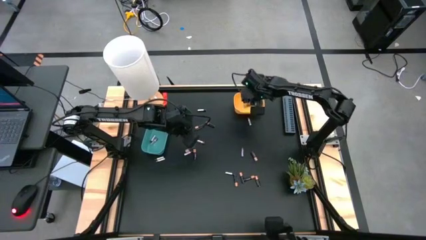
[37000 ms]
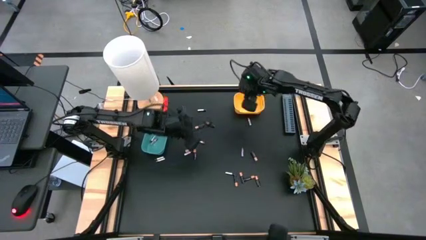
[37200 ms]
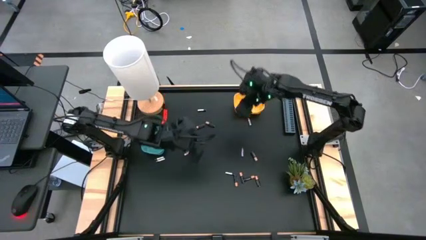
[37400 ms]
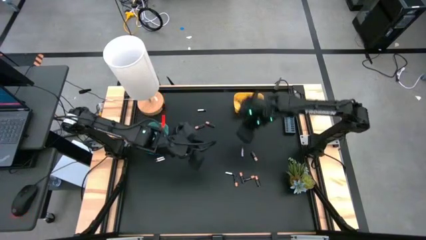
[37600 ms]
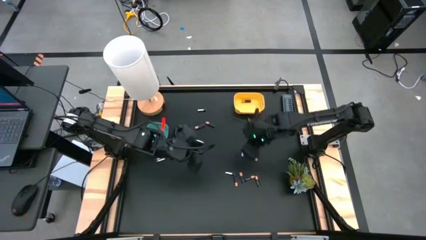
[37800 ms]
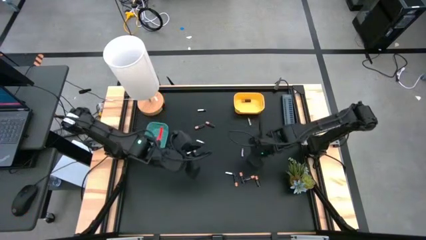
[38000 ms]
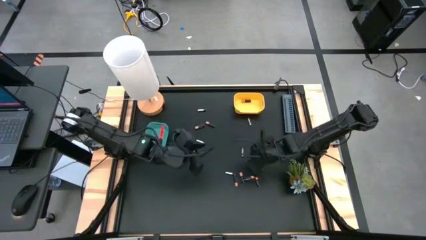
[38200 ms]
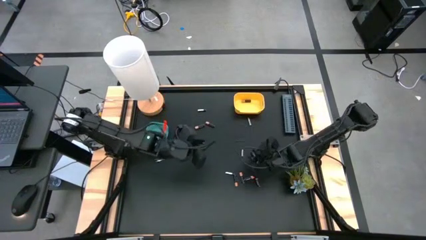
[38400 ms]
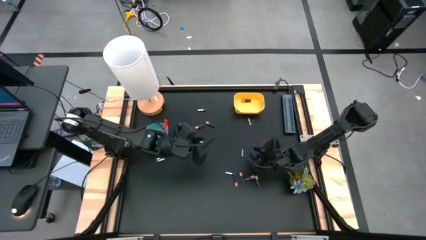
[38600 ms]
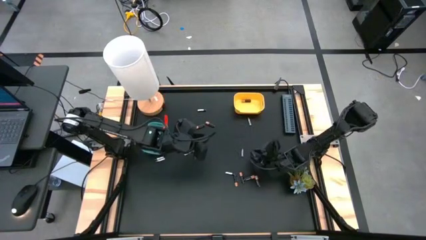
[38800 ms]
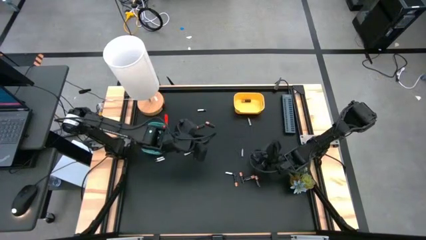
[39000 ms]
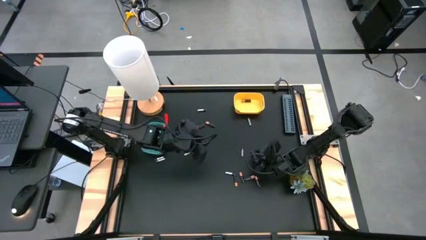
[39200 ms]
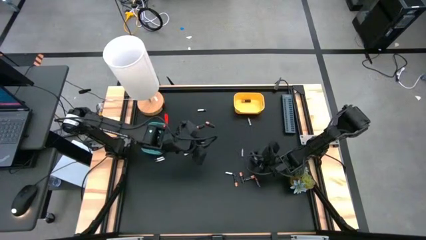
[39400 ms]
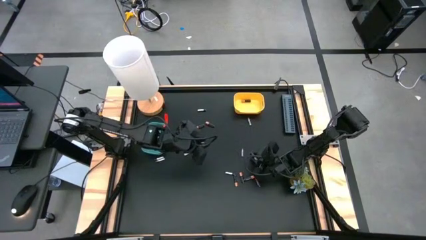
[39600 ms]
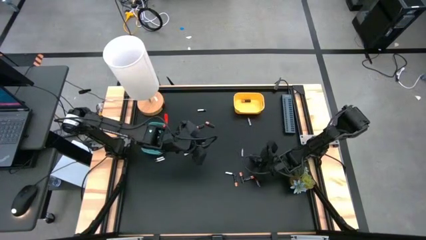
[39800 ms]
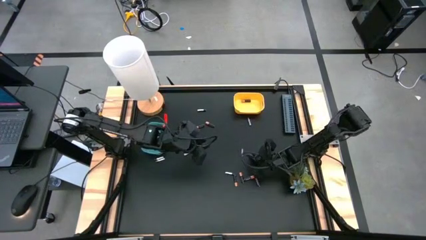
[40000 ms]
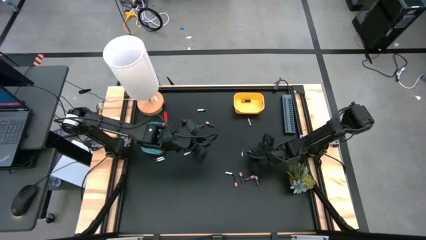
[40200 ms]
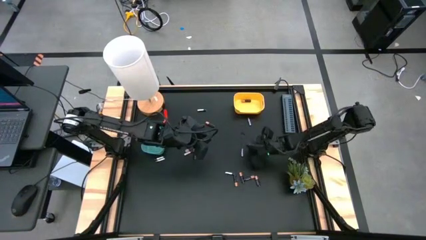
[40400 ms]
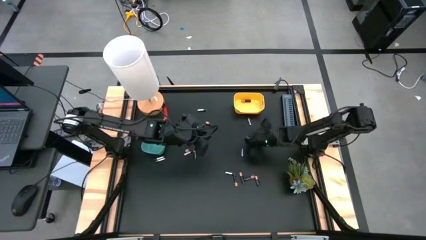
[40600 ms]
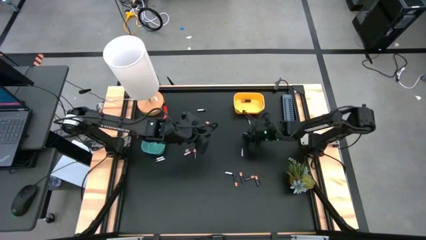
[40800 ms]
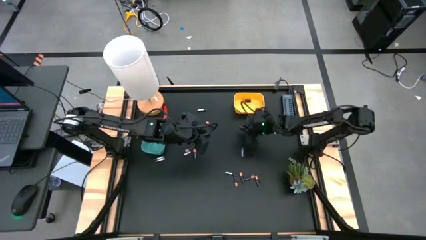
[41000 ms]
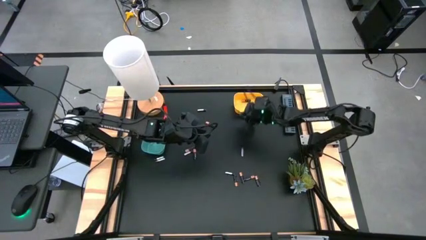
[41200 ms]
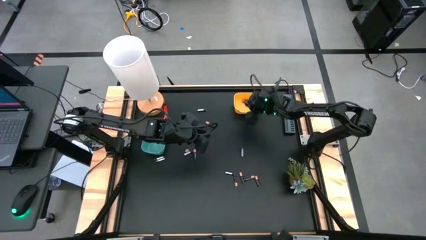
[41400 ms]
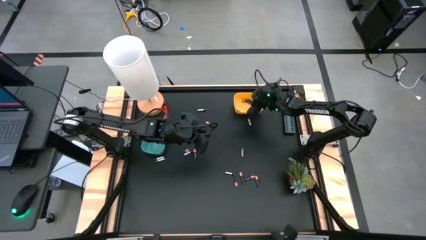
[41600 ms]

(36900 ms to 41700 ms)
Task: Sort batteries
Put the black battery into the yellow bin

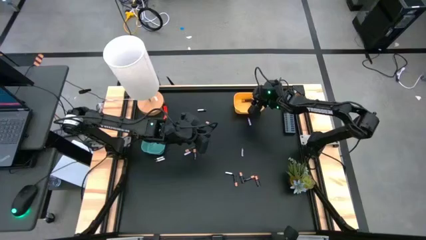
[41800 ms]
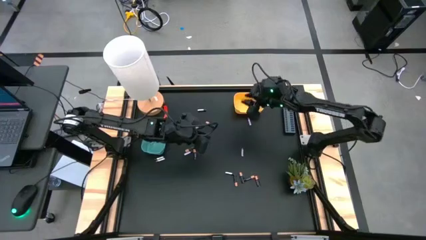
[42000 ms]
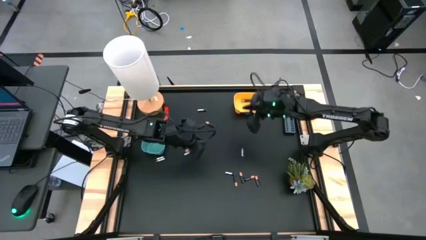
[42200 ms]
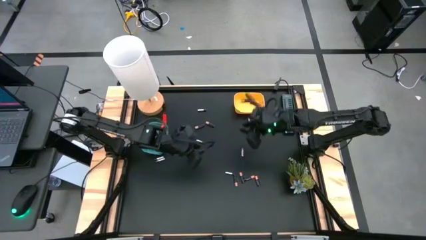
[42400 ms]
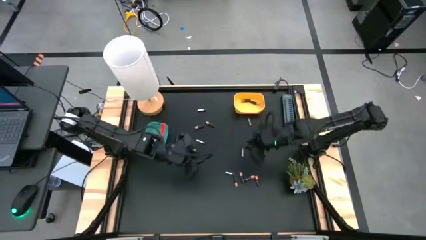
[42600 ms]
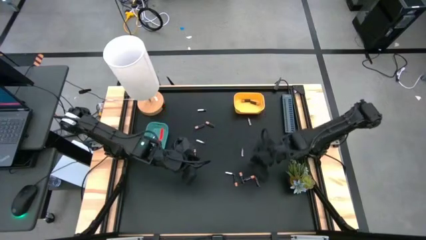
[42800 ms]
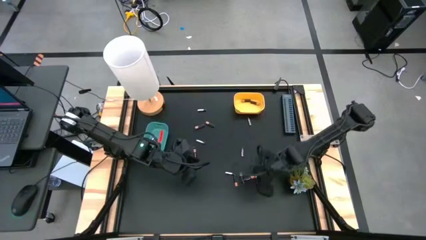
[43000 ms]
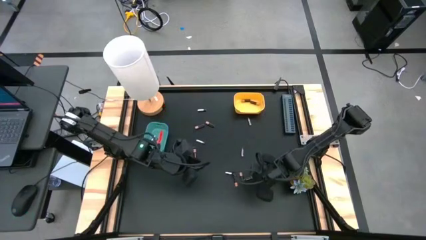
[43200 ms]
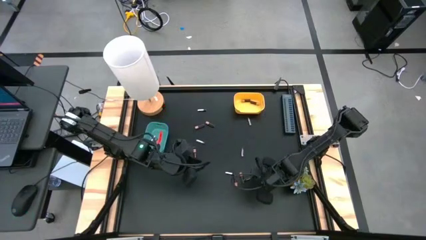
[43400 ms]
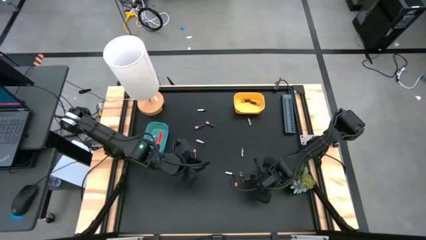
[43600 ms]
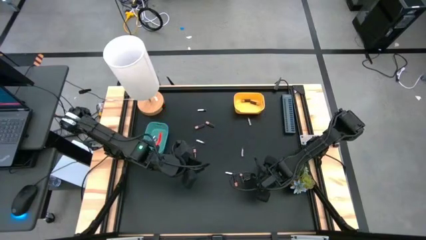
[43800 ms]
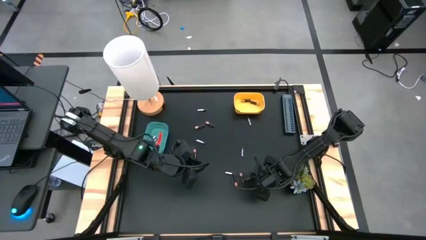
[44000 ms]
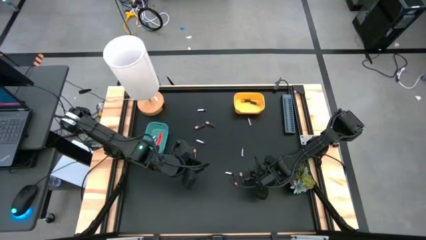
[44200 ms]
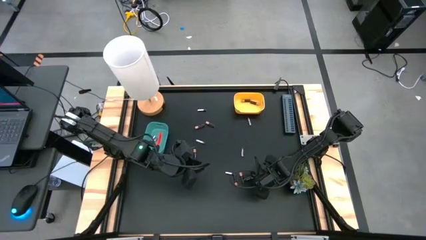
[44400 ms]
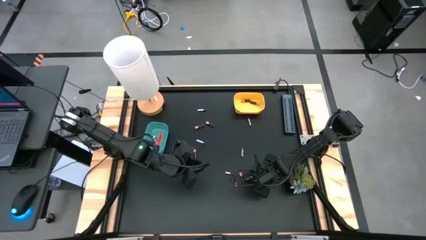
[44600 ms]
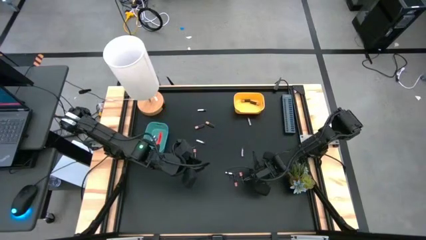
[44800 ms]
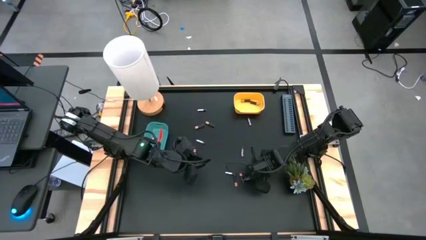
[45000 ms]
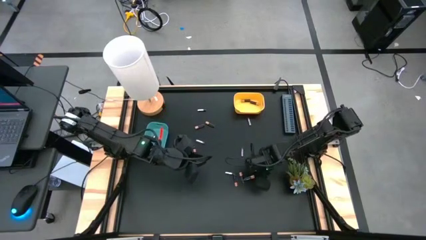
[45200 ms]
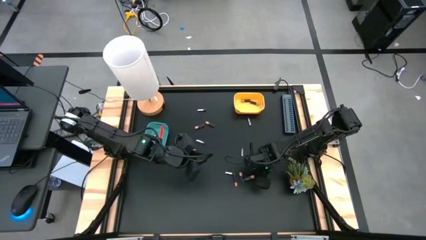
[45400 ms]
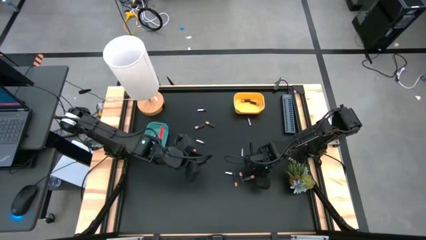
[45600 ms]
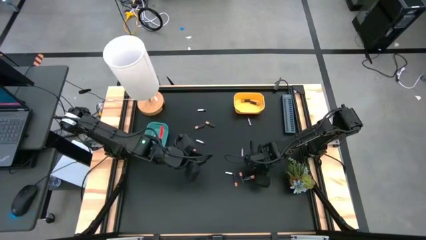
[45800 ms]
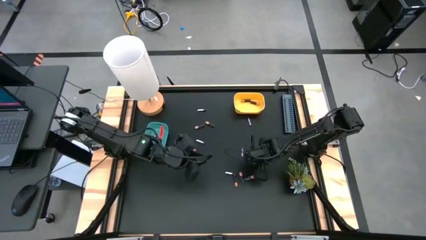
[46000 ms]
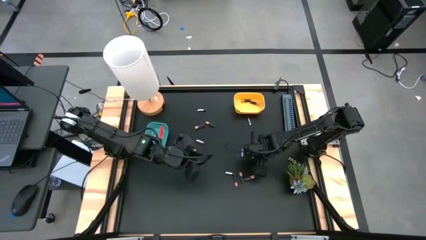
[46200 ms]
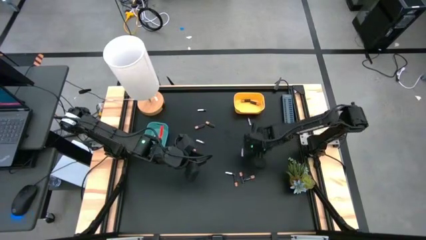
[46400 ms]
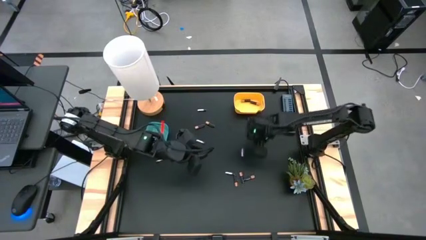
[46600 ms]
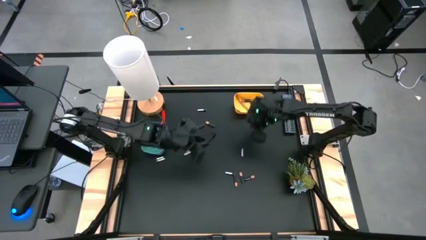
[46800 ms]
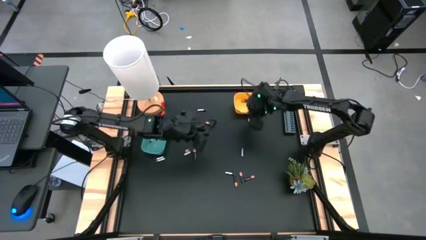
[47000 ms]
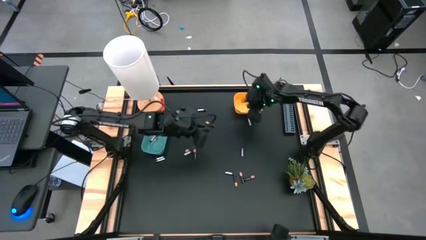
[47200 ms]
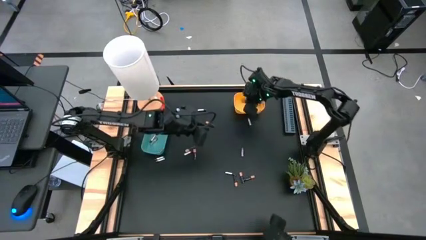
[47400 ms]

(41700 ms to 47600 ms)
Put the black battery into the yellow bin

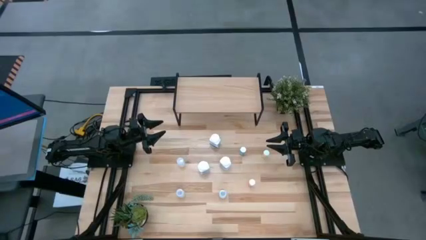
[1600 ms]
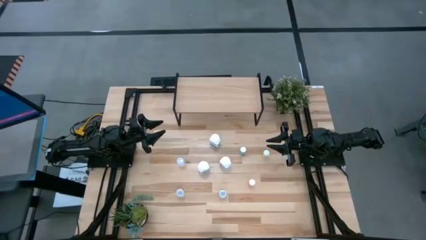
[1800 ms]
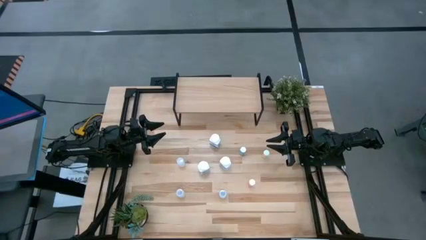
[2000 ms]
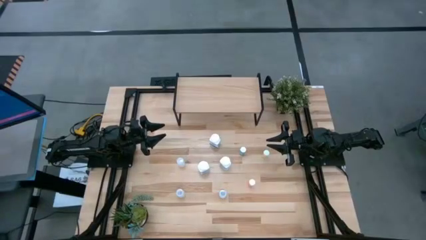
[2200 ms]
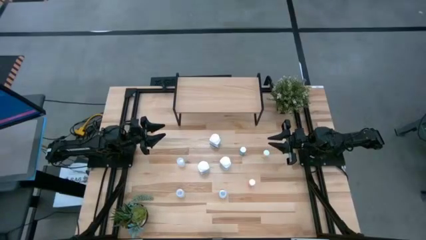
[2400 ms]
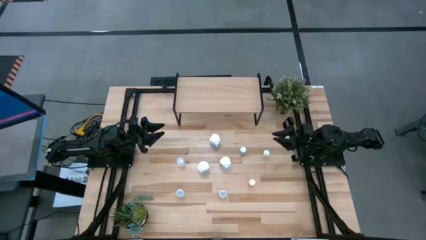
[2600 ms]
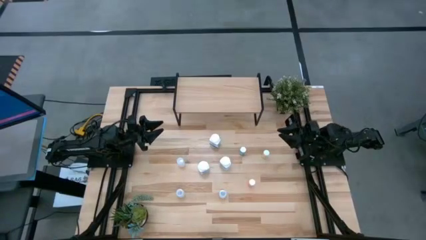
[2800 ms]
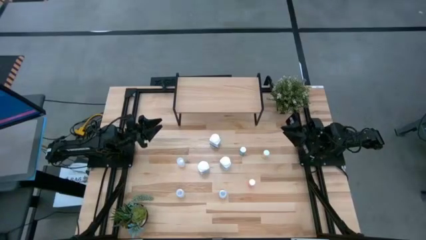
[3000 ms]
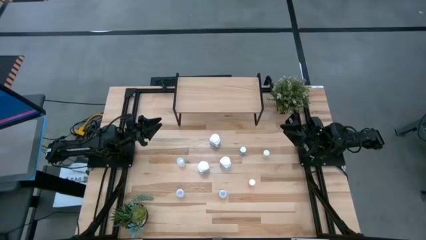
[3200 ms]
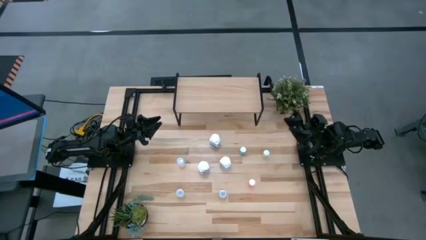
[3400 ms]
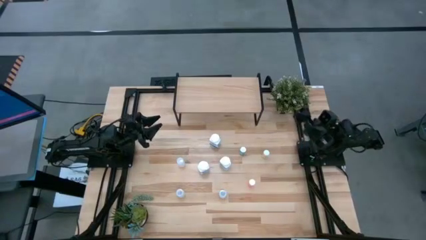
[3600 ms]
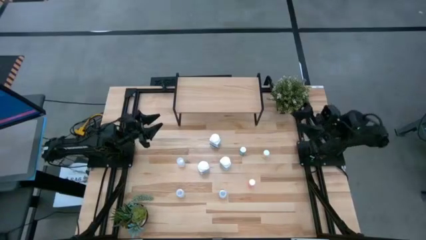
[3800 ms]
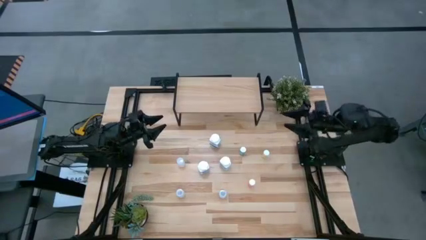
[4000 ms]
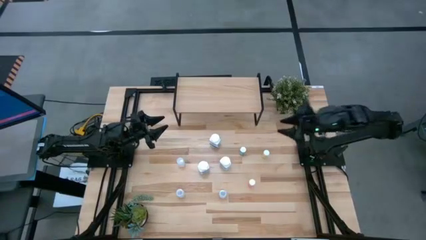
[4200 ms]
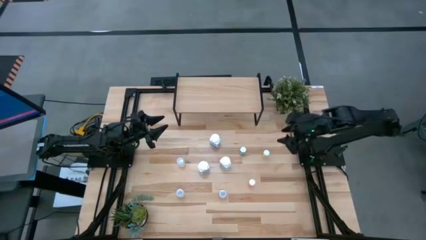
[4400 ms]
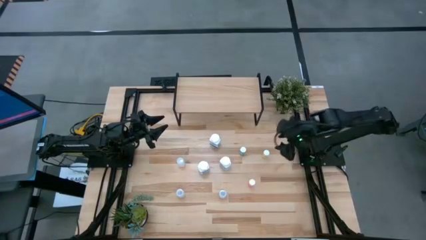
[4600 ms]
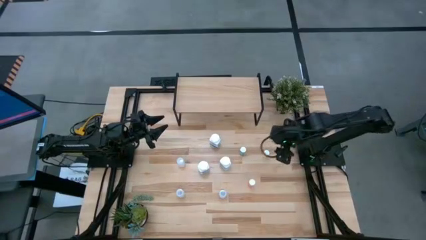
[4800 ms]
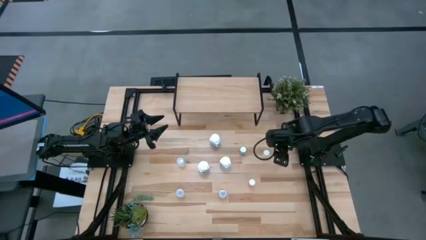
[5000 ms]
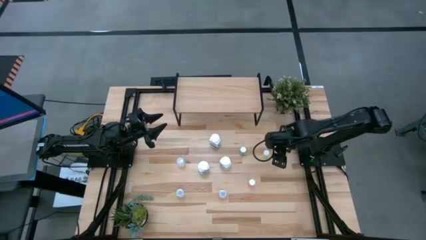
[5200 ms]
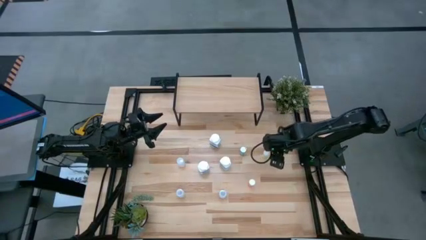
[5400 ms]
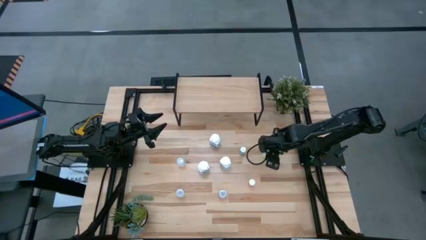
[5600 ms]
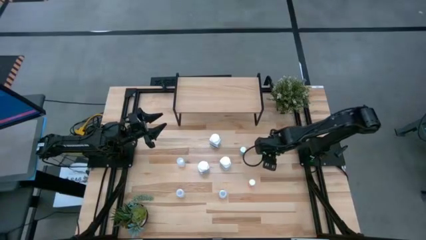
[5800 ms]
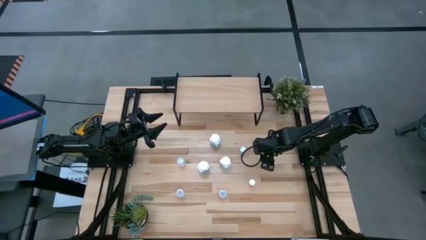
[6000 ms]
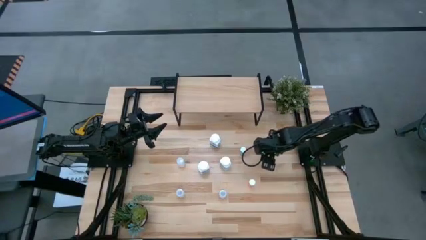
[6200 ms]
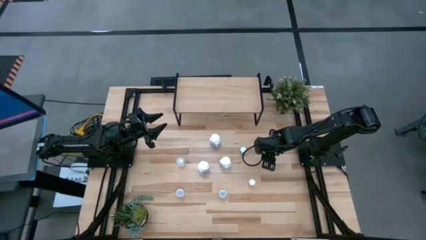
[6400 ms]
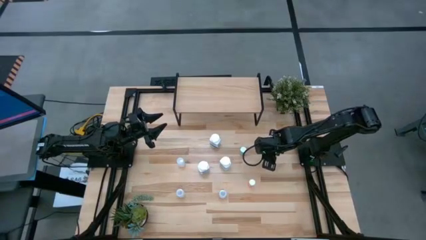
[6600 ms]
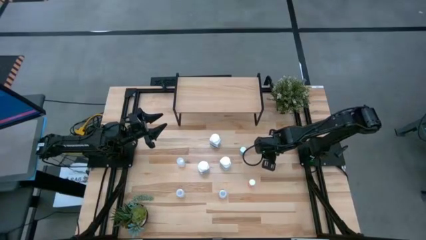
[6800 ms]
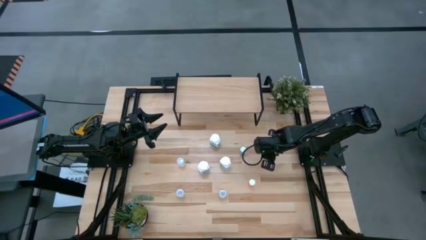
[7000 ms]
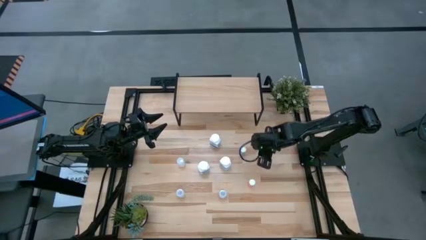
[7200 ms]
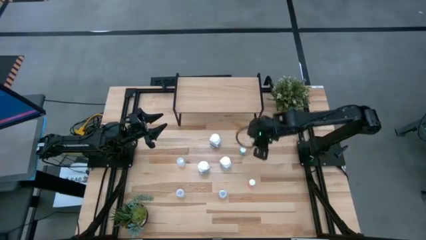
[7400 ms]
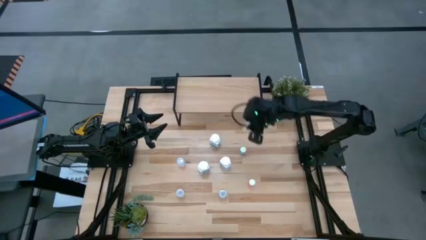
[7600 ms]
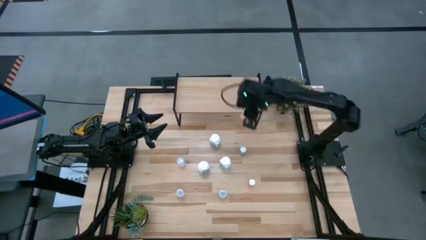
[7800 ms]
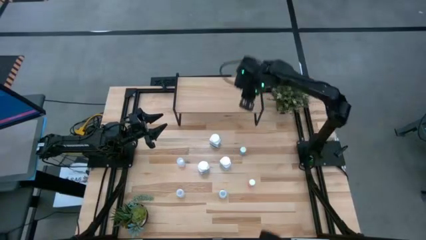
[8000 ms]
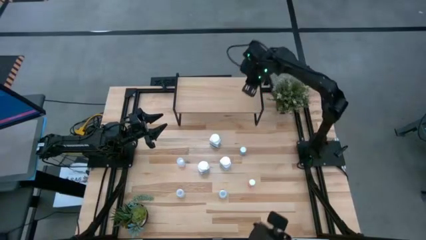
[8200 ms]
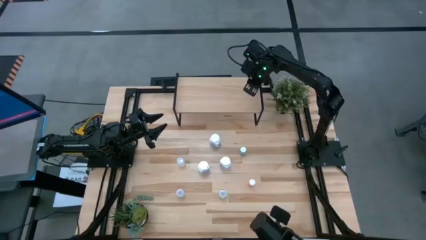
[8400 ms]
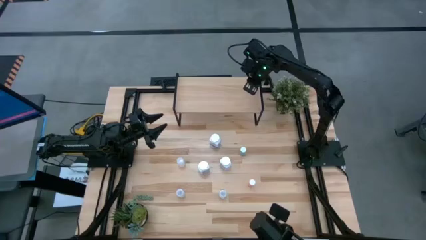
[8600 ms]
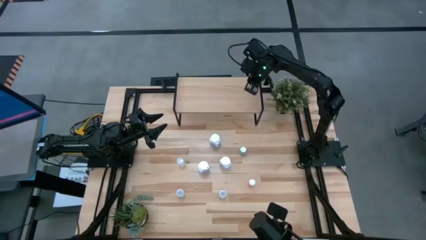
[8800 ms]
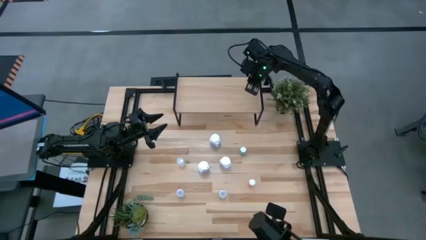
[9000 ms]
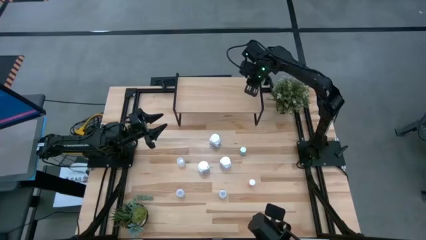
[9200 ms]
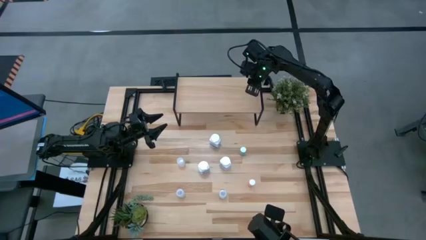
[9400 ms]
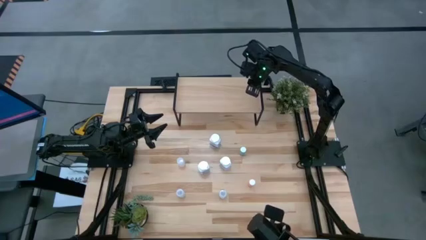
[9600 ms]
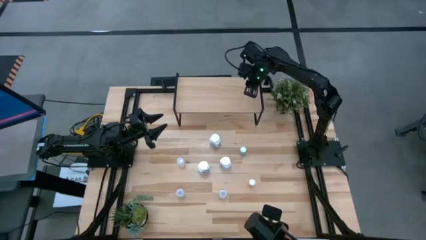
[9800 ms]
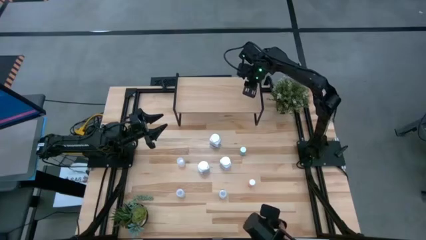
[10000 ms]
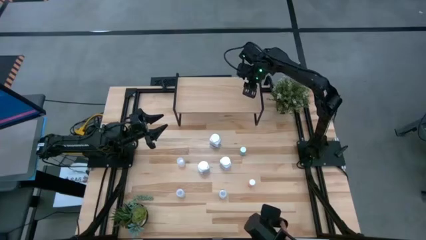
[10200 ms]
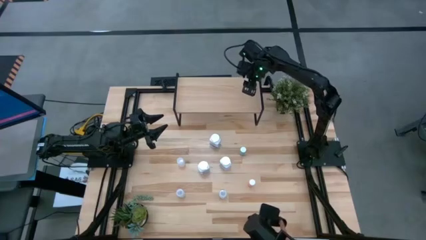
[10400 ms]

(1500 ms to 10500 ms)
Task: Pick and place medicine bottles onto shelf by color
Put the yellow medicine bottle on the shelf
